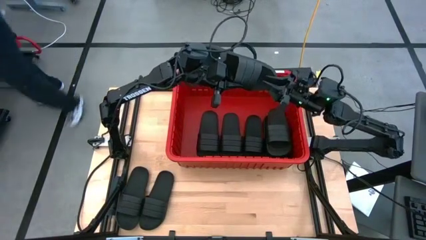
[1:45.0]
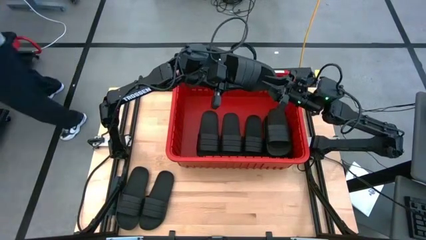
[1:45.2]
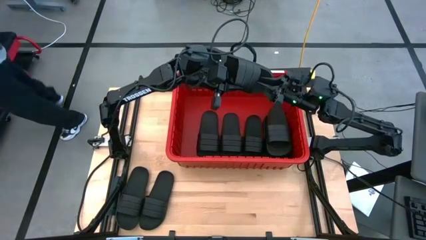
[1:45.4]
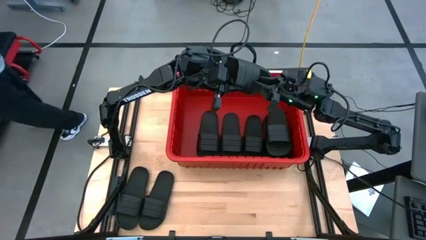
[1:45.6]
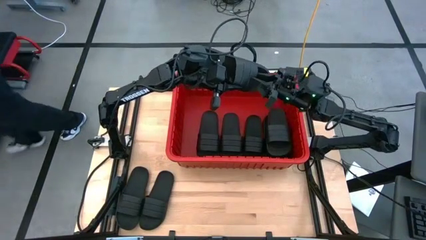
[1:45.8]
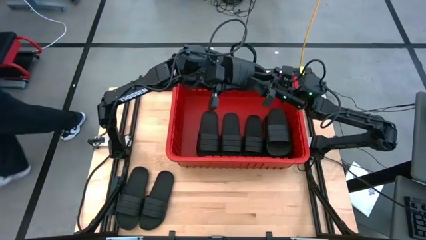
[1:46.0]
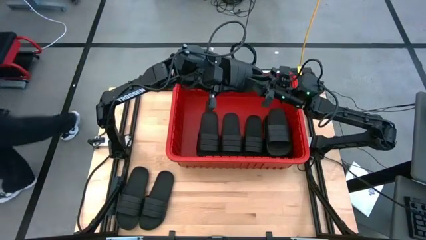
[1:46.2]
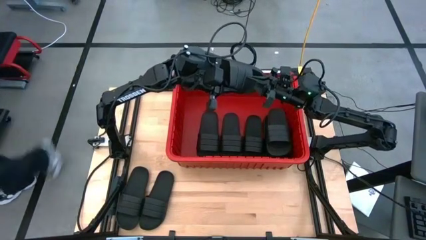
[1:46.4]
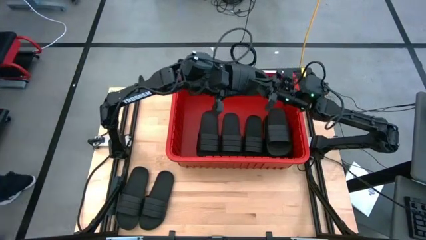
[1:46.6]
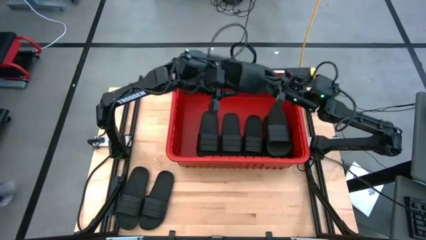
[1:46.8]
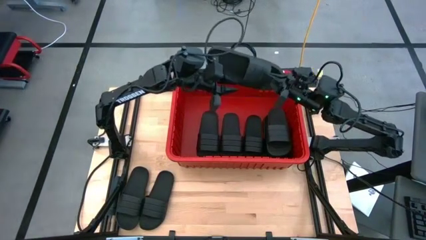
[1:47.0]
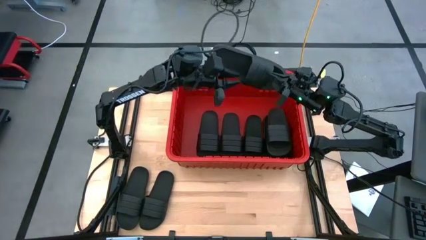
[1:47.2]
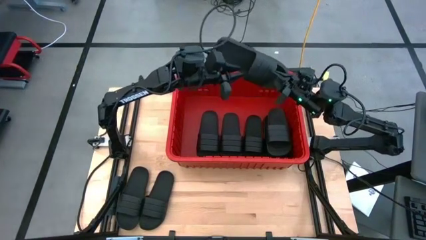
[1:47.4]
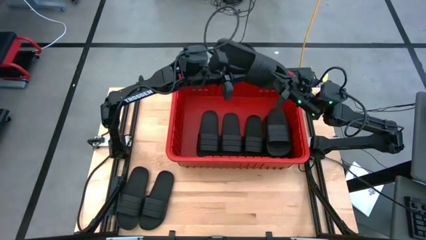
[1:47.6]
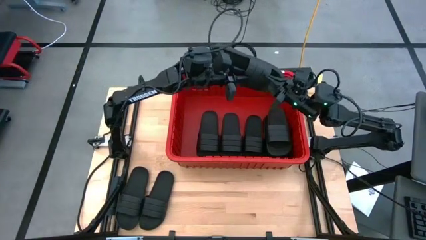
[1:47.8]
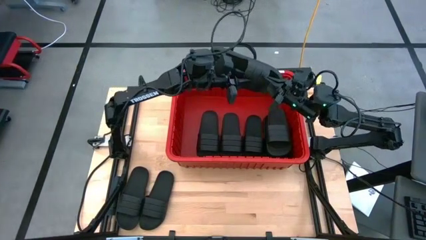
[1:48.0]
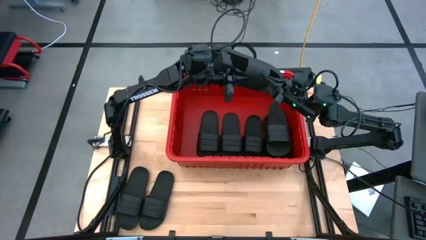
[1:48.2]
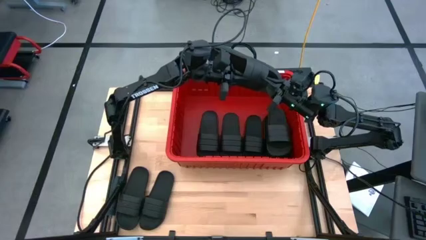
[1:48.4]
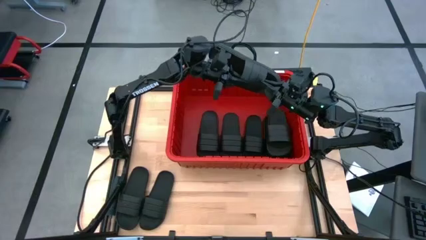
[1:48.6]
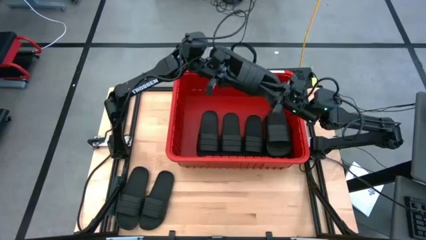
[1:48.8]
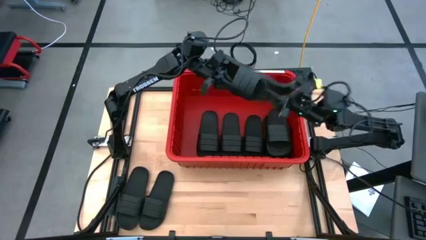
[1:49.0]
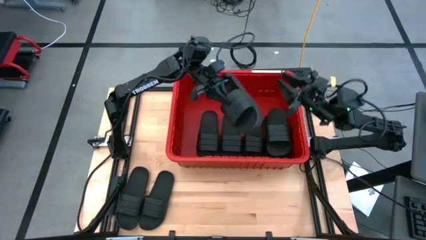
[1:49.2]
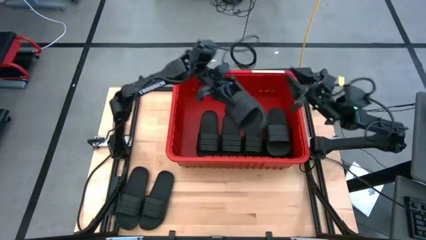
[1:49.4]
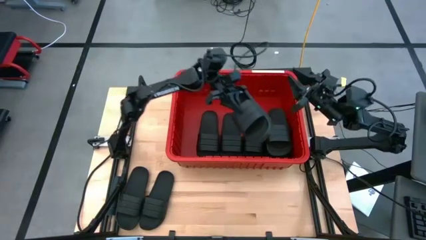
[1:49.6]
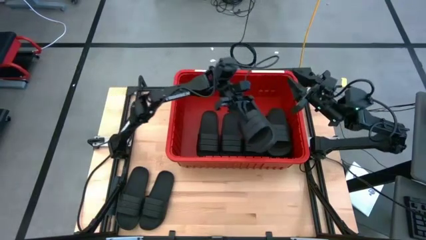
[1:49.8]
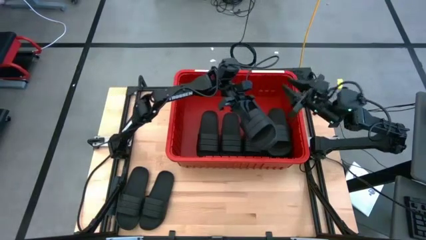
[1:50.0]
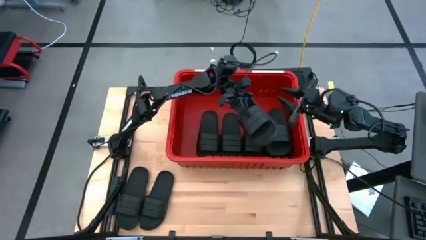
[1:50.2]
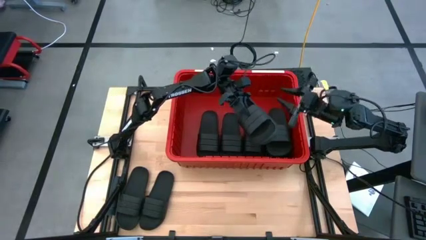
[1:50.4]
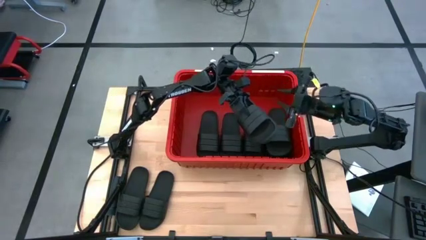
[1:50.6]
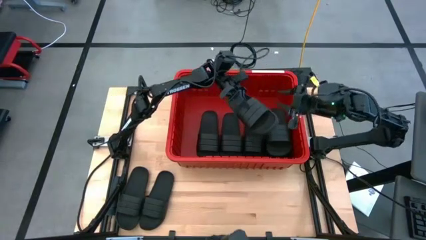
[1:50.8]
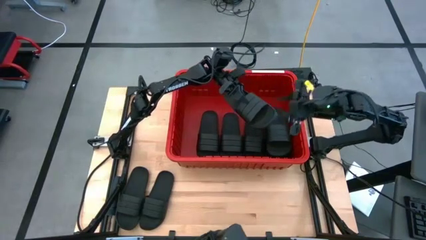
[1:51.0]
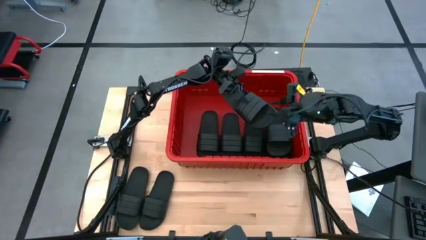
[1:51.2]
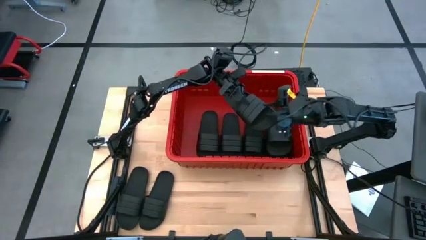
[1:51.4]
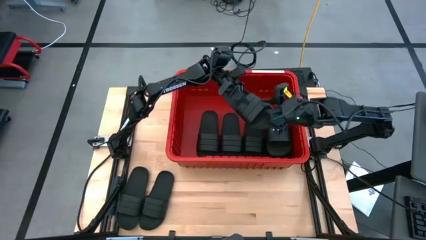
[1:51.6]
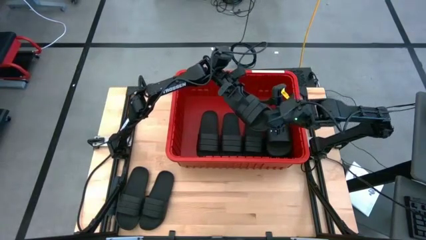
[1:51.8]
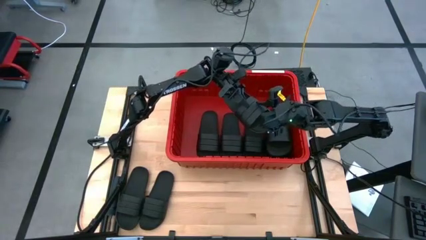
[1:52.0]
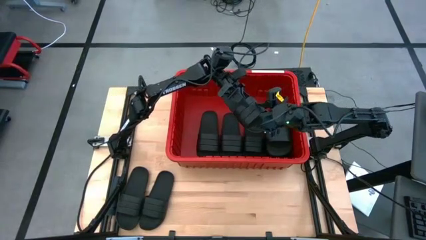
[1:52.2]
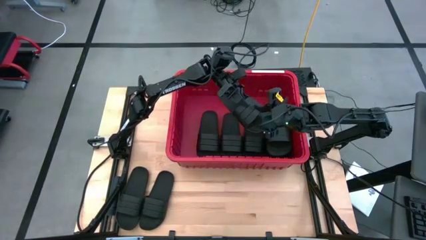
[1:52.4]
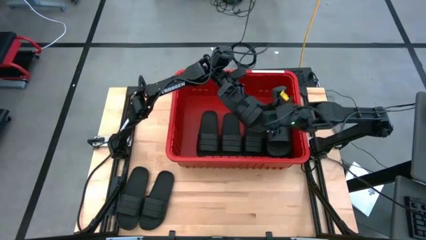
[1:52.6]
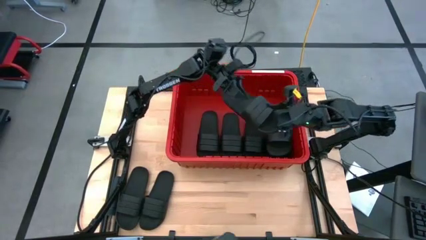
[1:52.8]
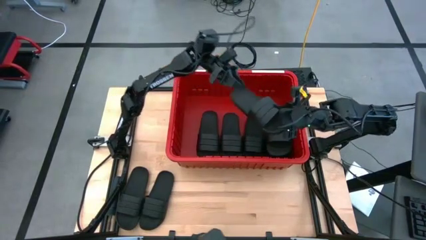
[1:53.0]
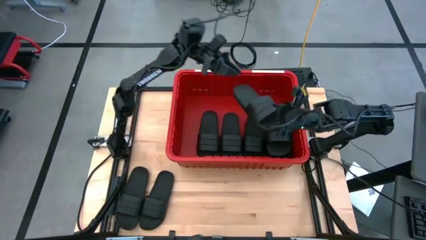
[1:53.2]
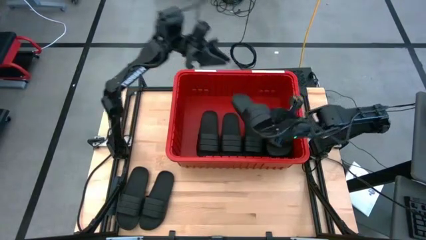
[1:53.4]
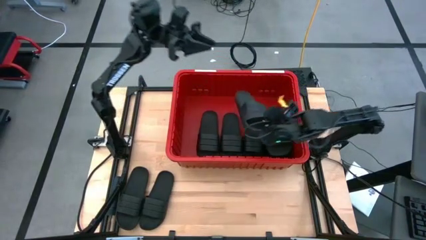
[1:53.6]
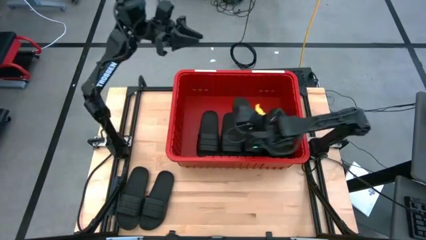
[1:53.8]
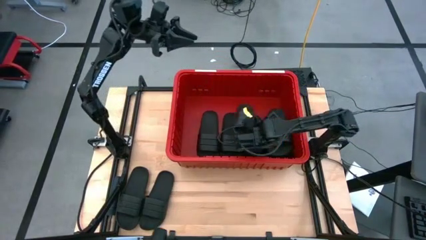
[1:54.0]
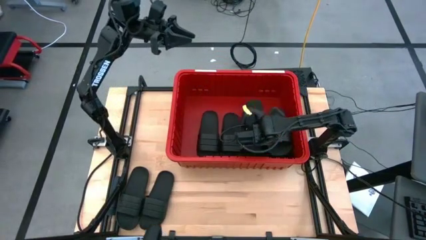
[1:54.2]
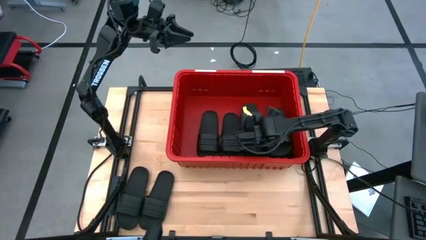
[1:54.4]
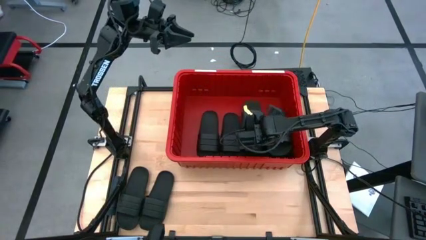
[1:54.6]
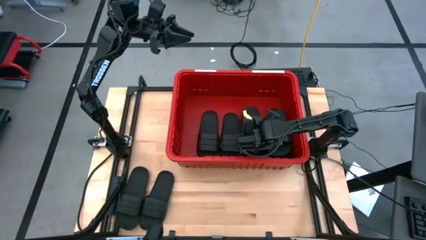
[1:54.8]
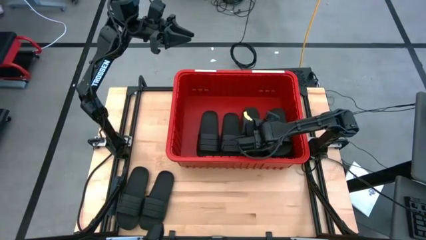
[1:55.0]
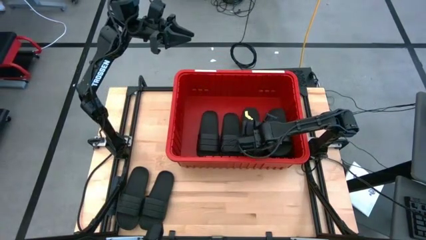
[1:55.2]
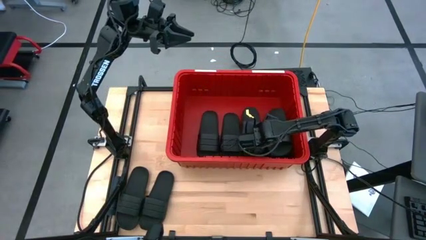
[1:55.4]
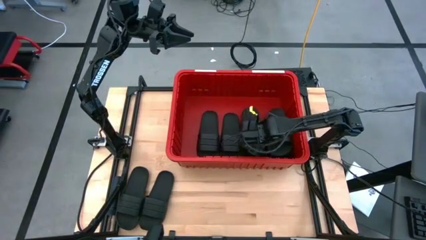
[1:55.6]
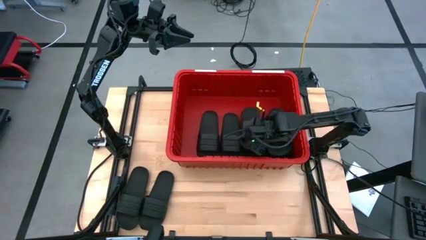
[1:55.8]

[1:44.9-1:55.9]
Task: Pick and place slides into bin
Put the black slide into the red bin

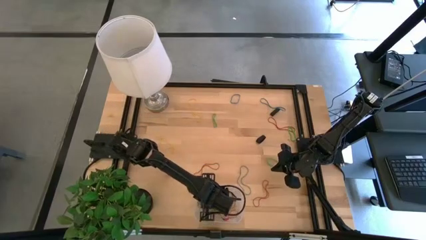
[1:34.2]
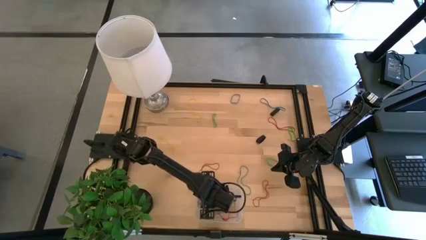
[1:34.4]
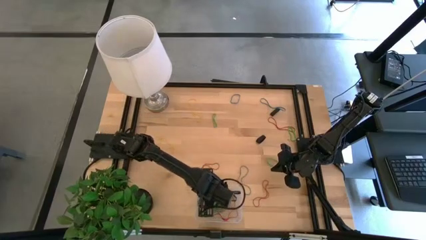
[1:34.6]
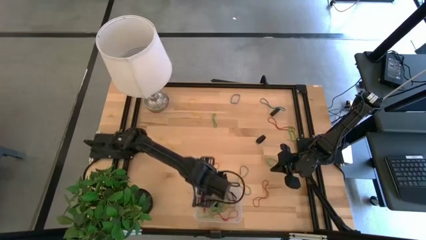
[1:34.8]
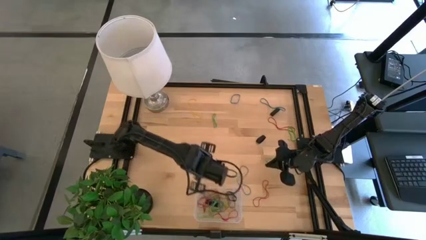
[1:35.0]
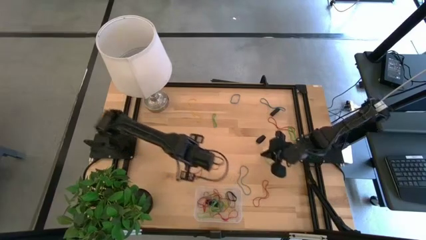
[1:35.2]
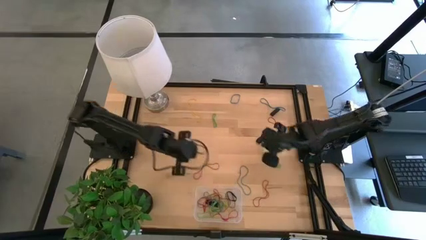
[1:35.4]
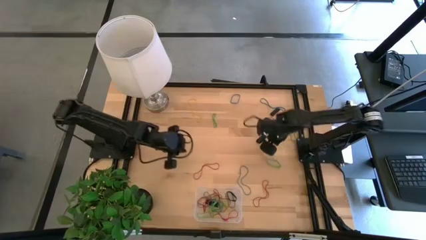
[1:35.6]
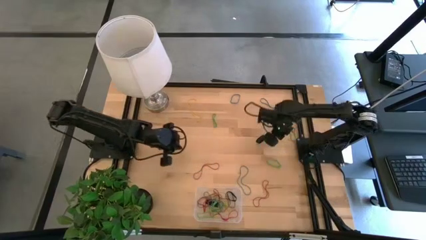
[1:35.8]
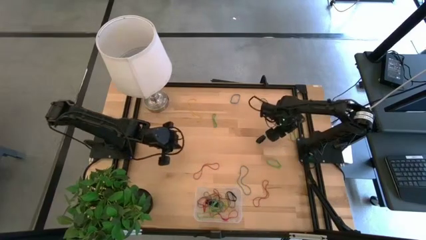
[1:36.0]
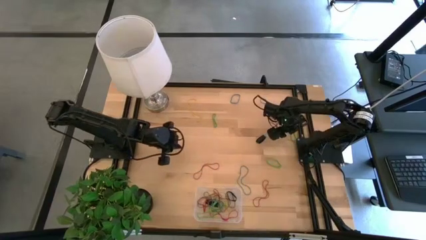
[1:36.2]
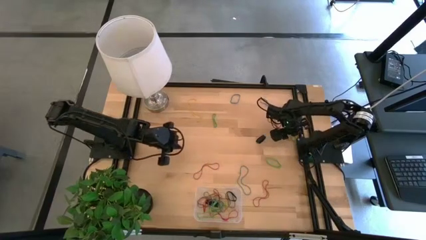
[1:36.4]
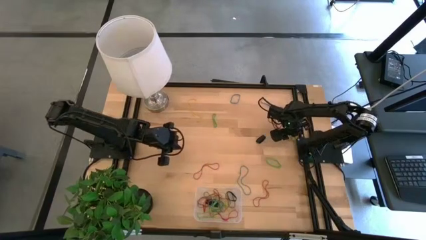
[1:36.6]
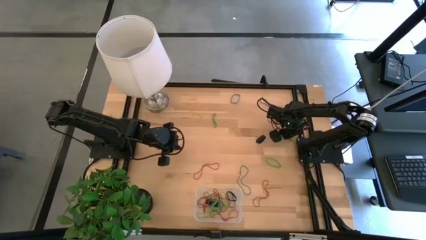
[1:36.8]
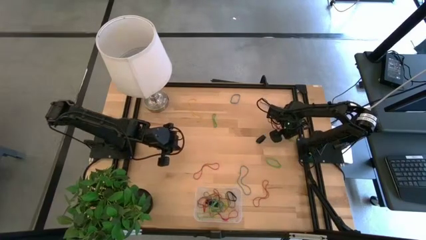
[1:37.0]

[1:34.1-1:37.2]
Task: Pick and place rubber bands into bin
Put the green rubber band into the transparent bin

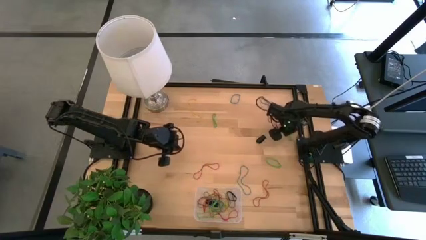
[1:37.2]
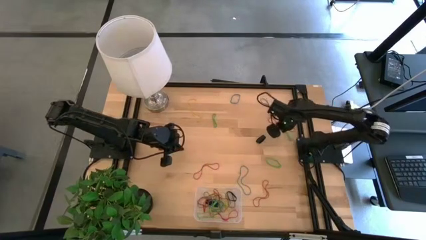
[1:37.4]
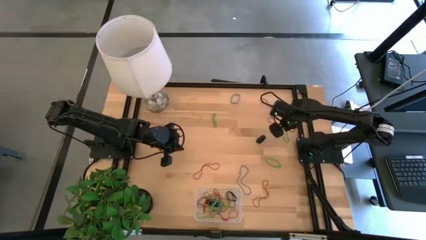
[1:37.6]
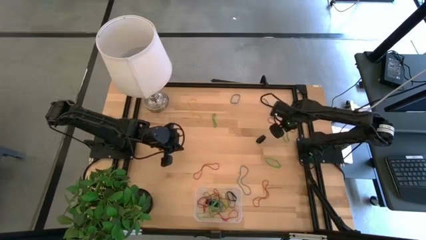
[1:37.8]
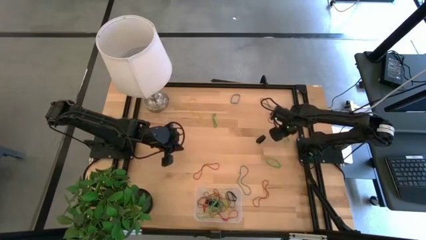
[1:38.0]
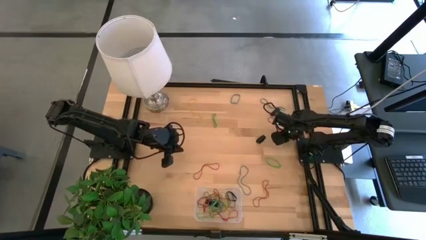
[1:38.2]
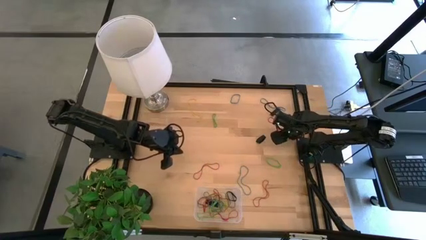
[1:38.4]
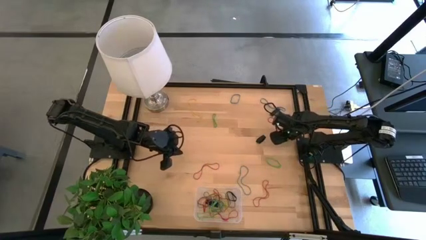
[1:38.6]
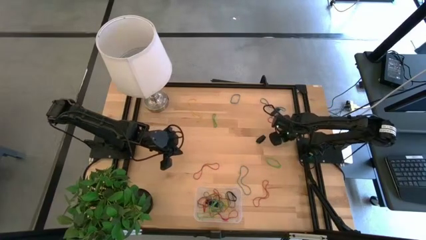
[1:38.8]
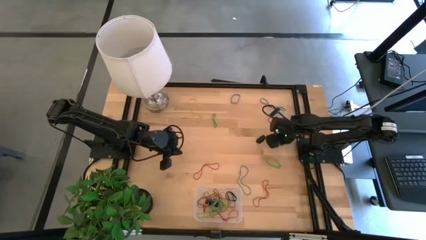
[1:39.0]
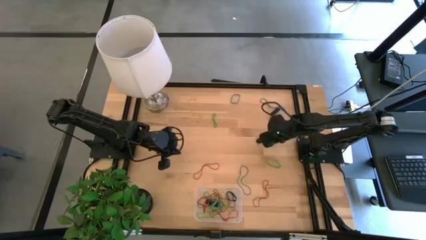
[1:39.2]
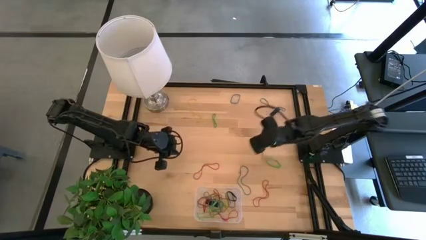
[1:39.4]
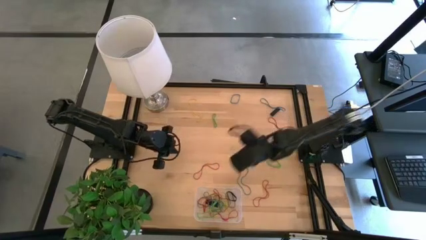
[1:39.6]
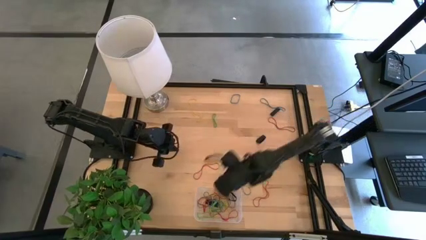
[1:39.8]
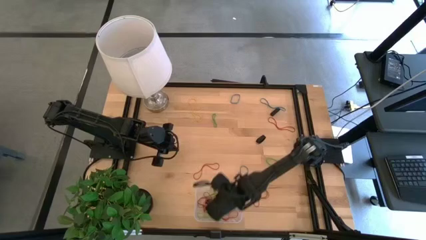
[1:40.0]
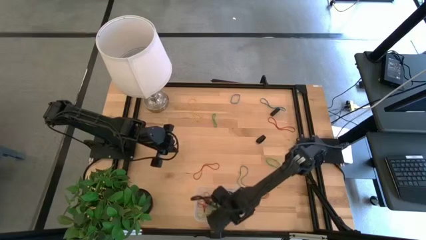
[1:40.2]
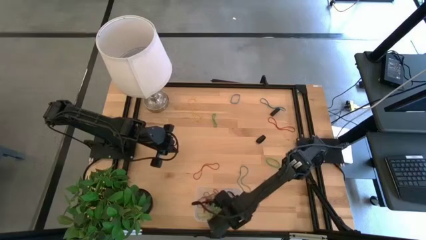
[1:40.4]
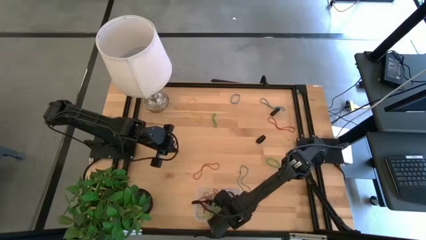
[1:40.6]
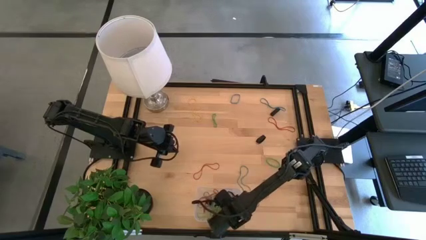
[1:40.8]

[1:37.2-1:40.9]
Put the green rubber band into the transparent bin
